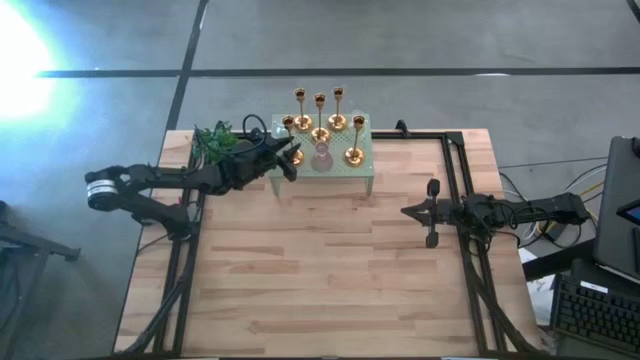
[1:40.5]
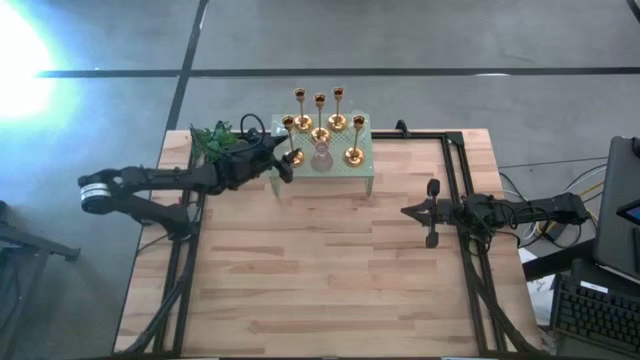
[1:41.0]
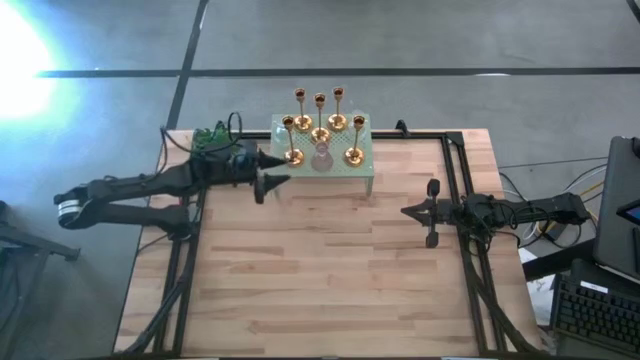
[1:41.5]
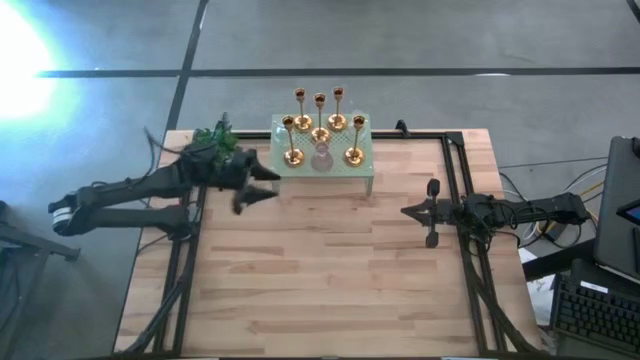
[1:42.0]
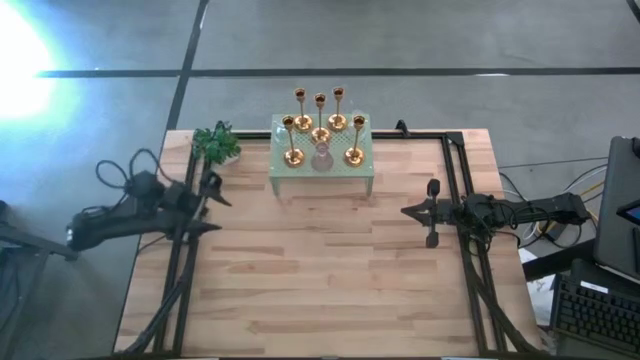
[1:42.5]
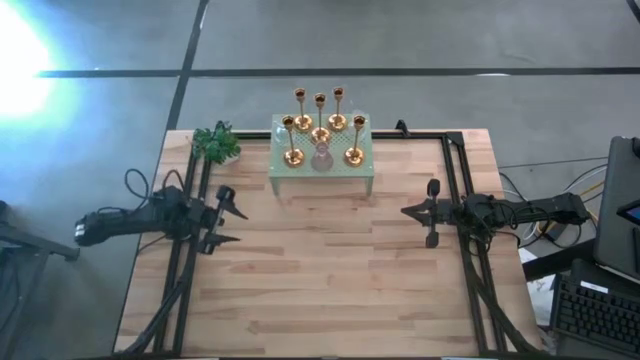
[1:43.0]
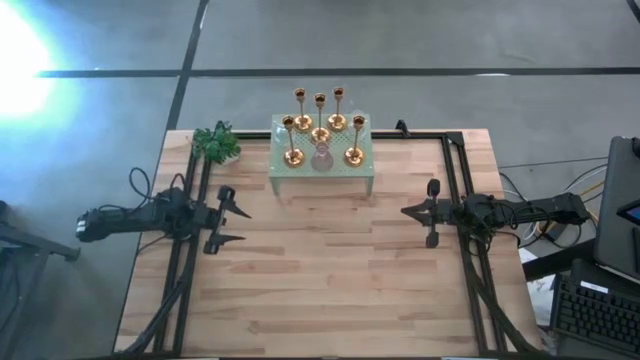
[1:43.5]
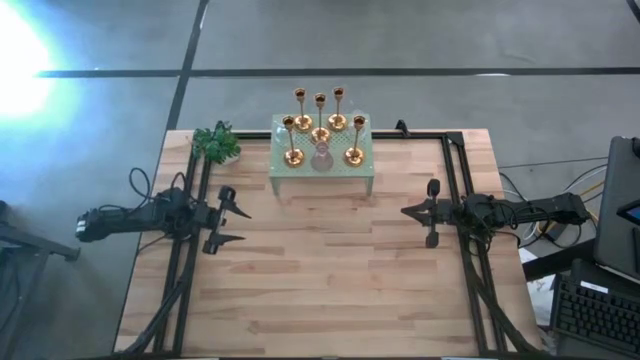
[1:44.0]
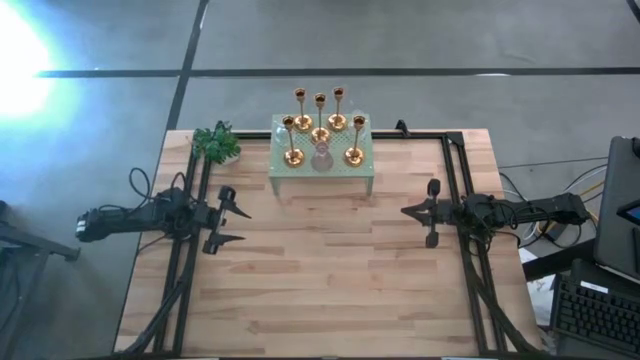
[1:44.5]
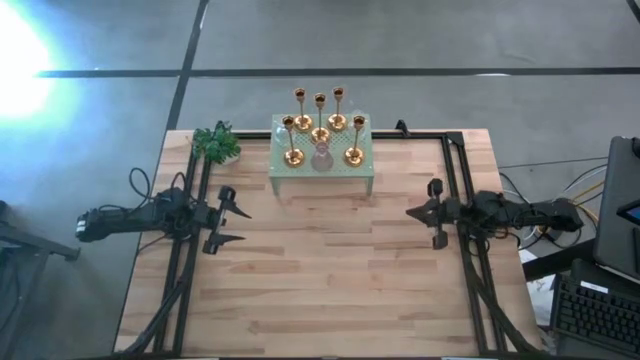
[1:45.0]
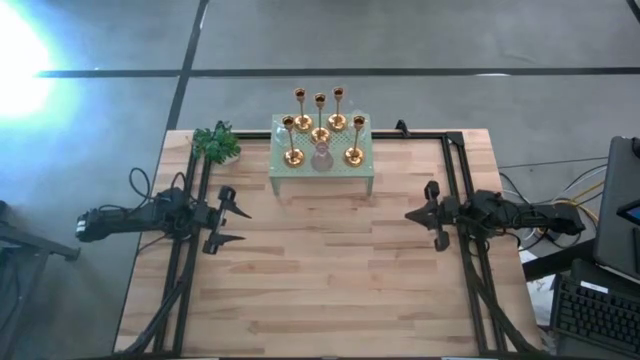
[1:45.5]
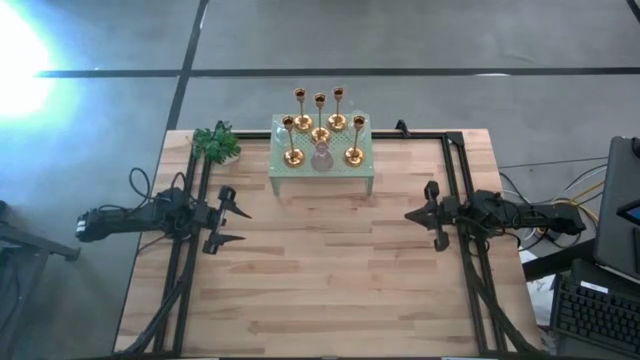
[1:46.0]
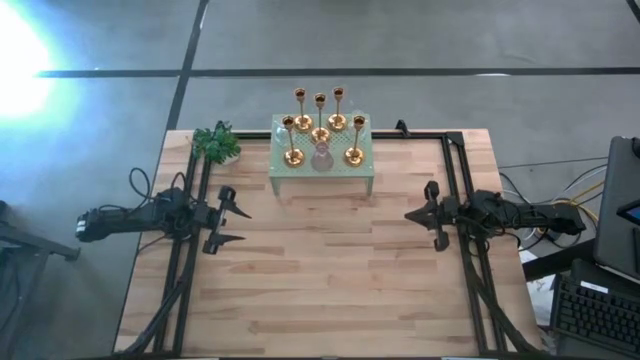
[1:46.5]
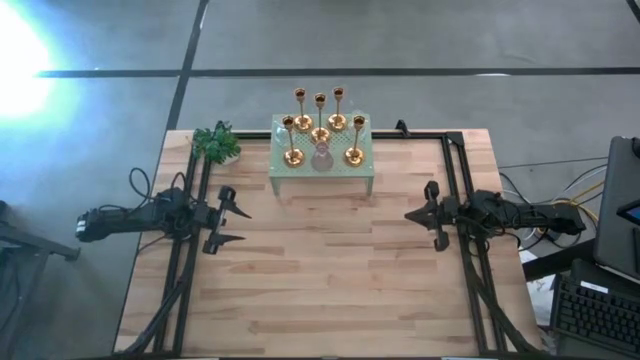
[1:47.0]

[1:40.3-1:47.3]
Task: Pick & Place candle stick holders
Return to Home Position

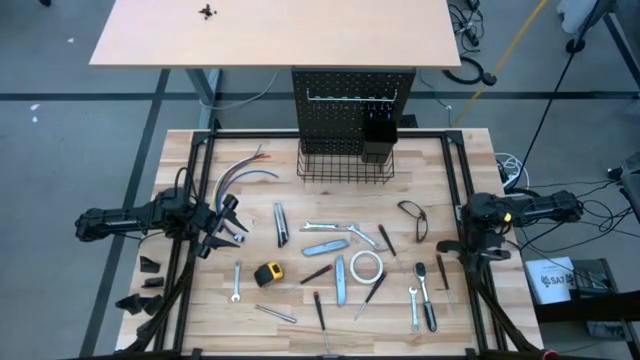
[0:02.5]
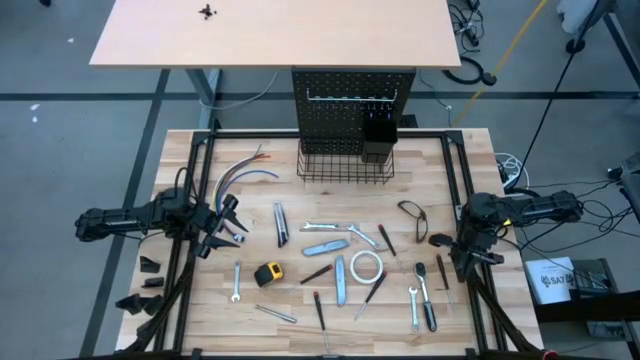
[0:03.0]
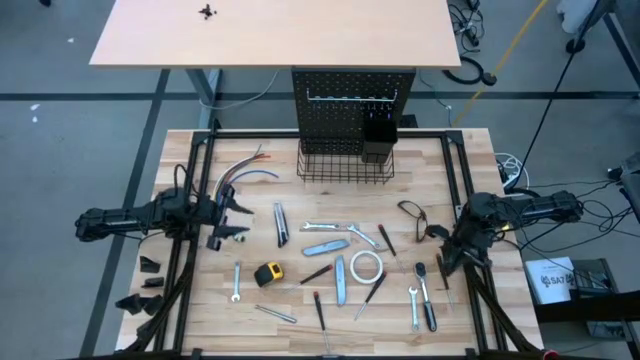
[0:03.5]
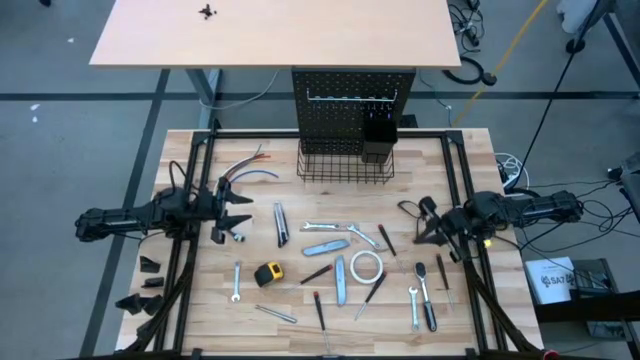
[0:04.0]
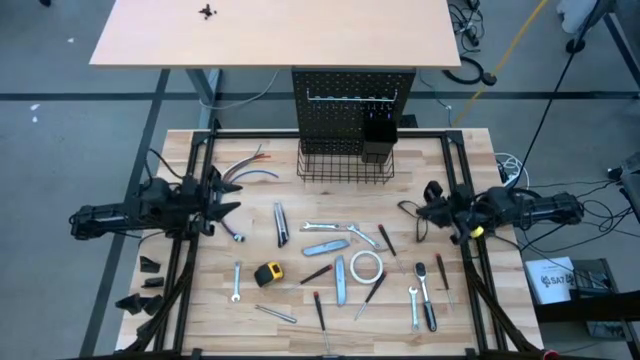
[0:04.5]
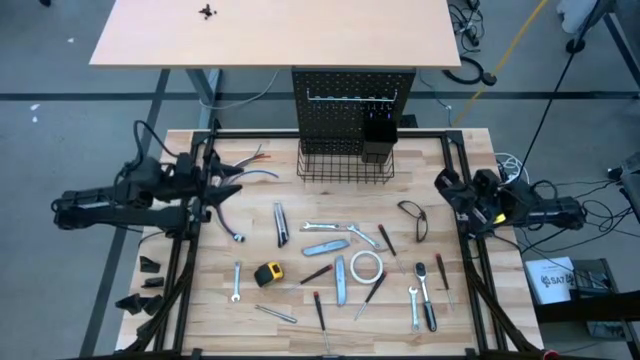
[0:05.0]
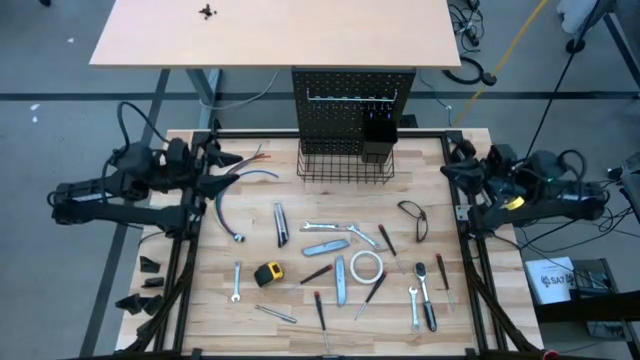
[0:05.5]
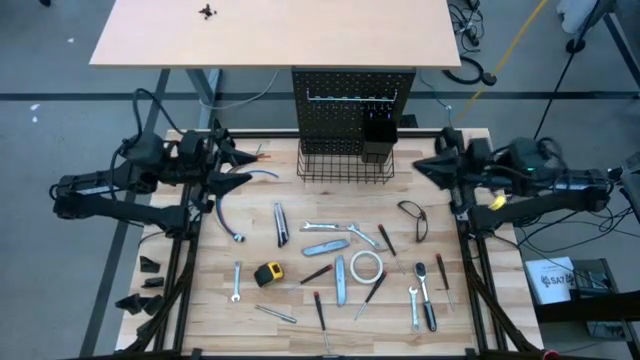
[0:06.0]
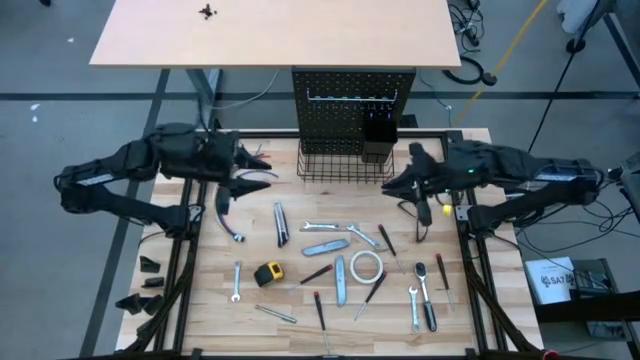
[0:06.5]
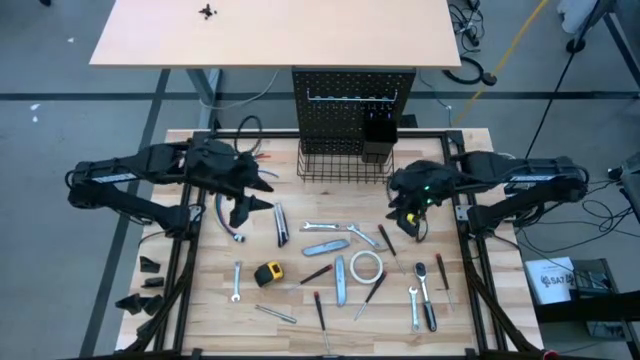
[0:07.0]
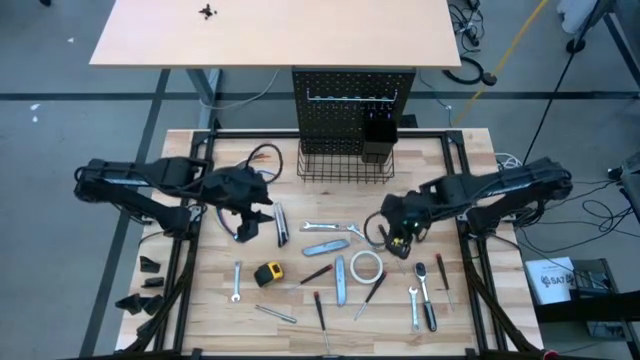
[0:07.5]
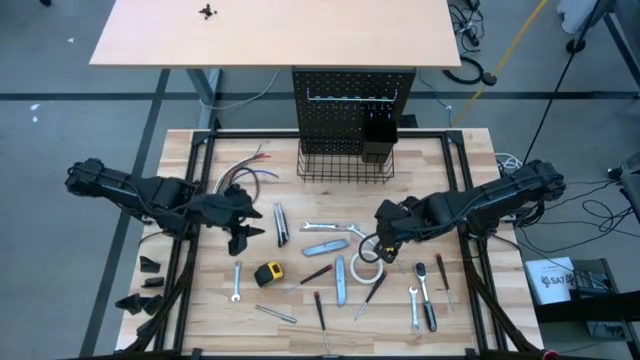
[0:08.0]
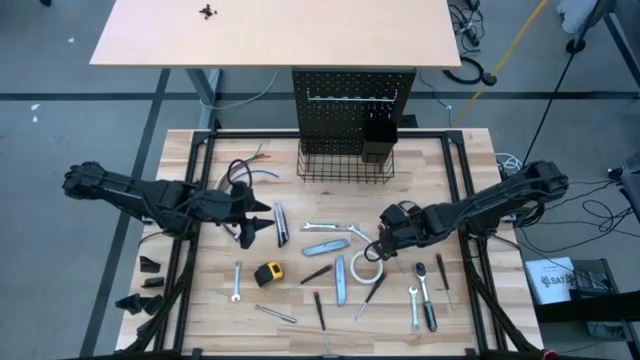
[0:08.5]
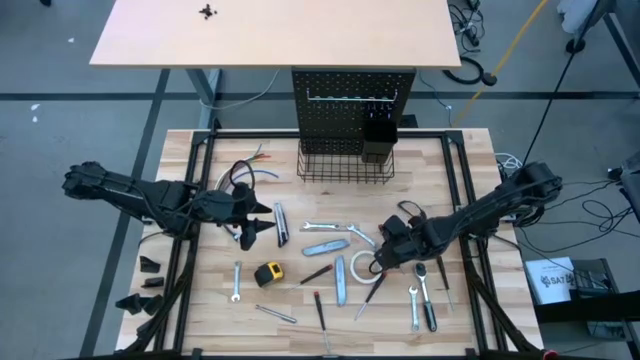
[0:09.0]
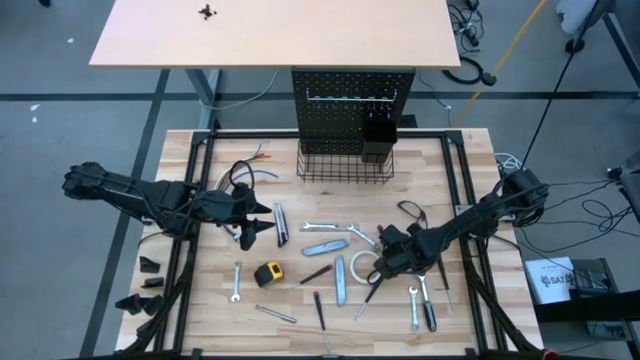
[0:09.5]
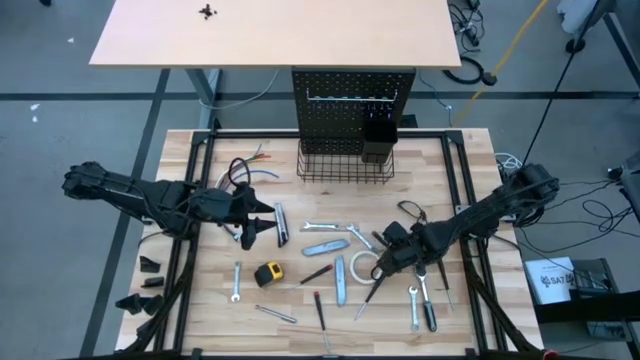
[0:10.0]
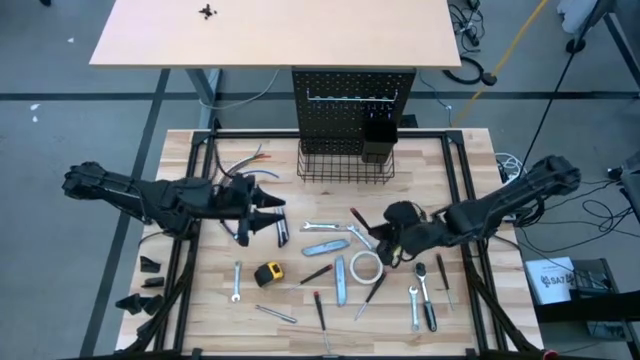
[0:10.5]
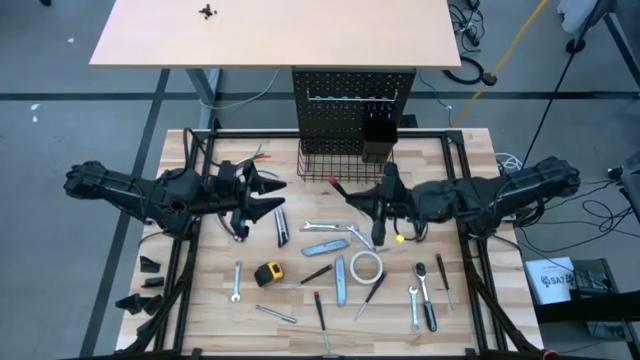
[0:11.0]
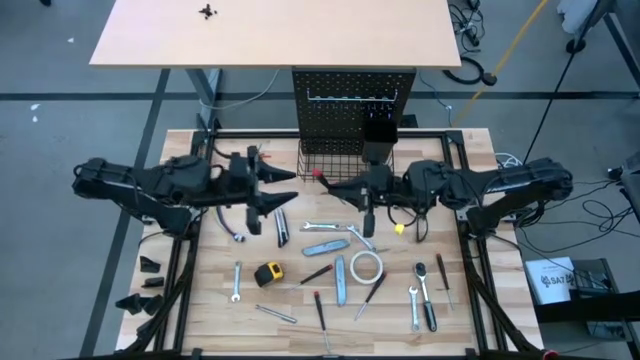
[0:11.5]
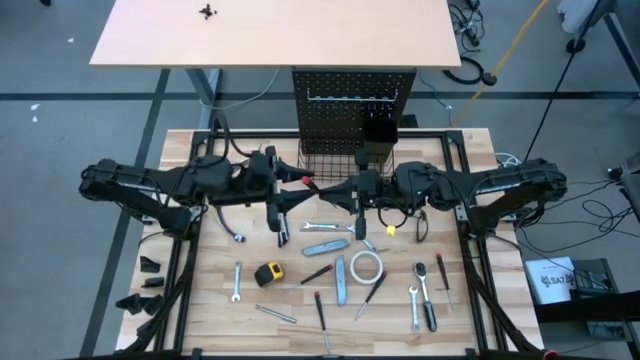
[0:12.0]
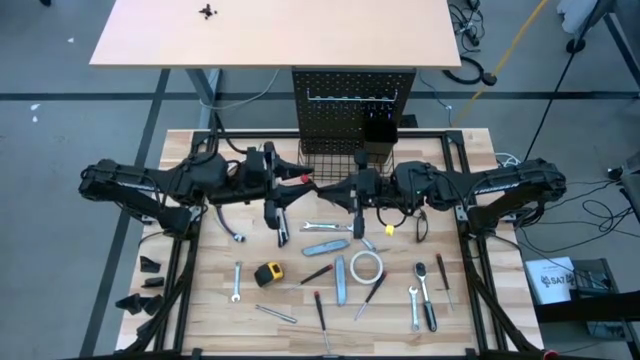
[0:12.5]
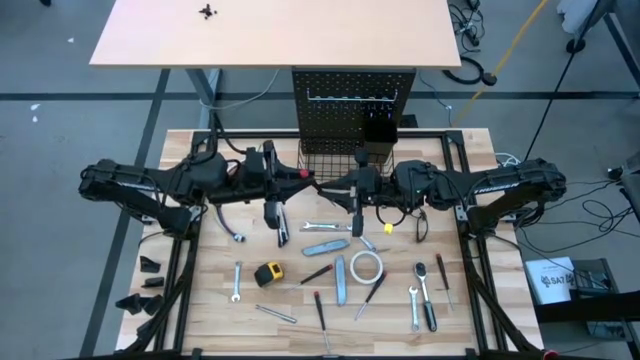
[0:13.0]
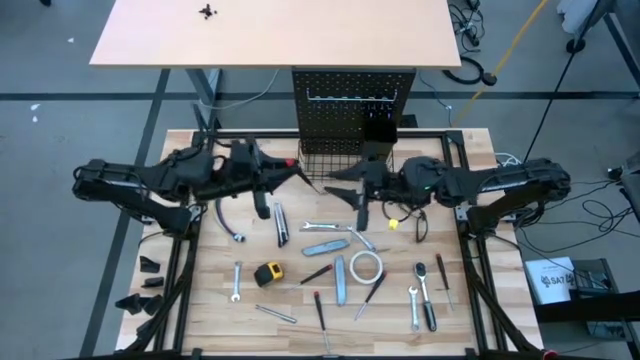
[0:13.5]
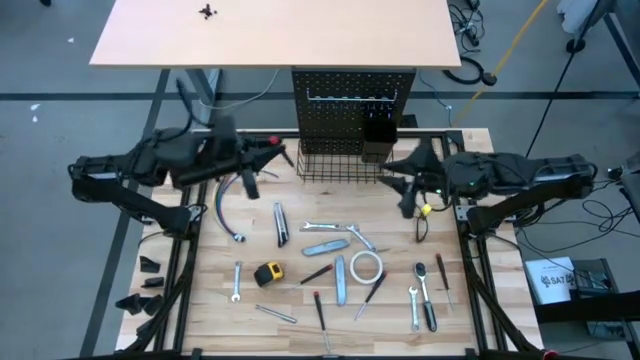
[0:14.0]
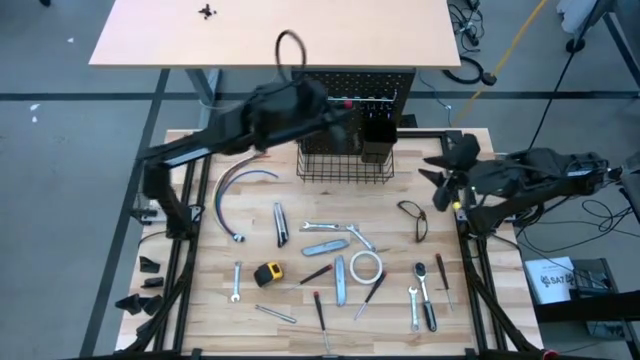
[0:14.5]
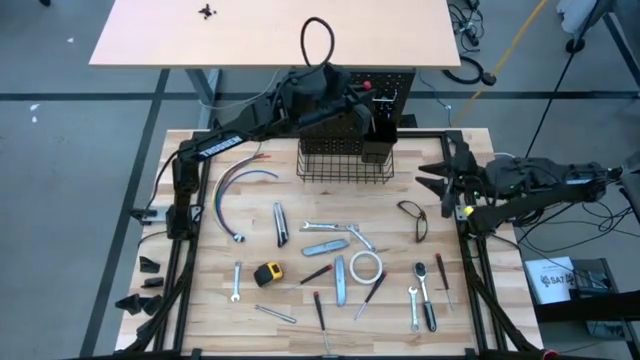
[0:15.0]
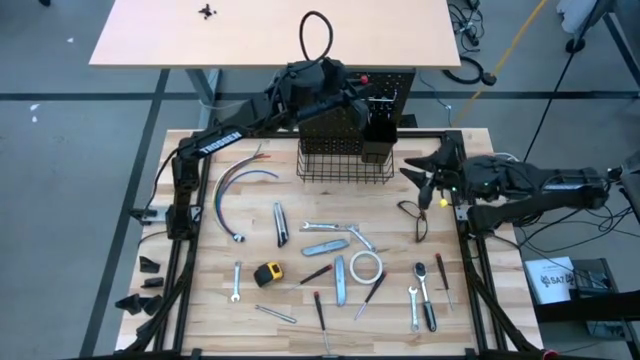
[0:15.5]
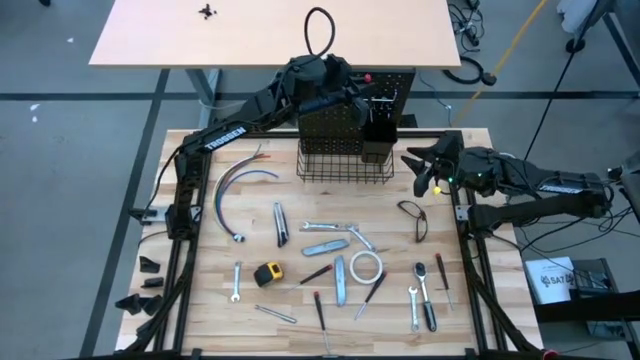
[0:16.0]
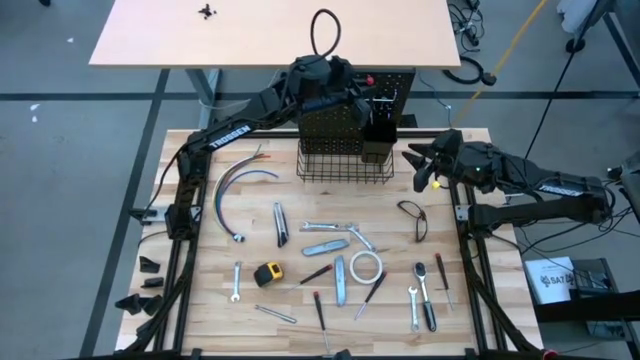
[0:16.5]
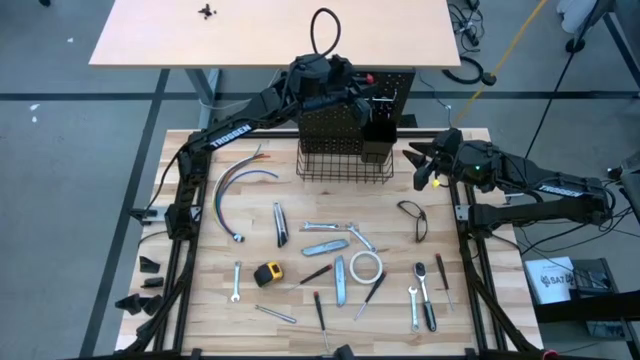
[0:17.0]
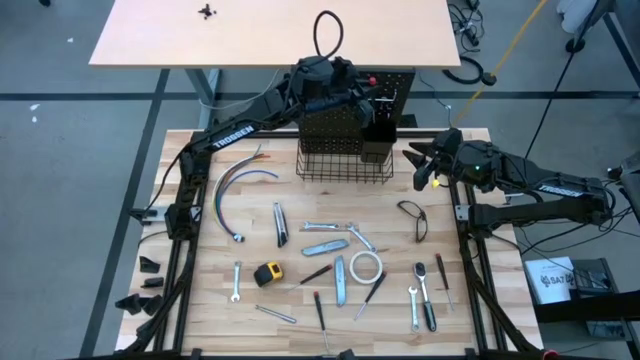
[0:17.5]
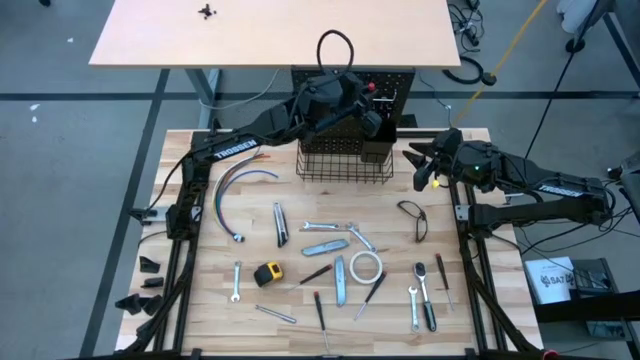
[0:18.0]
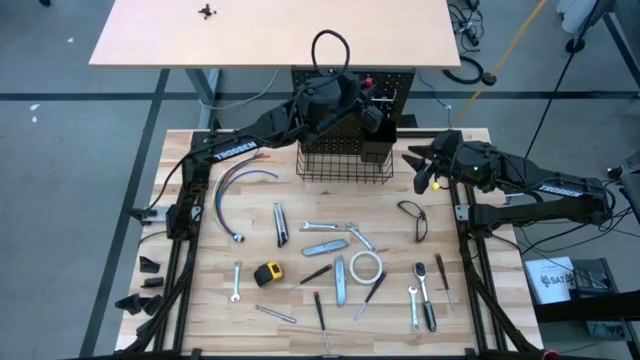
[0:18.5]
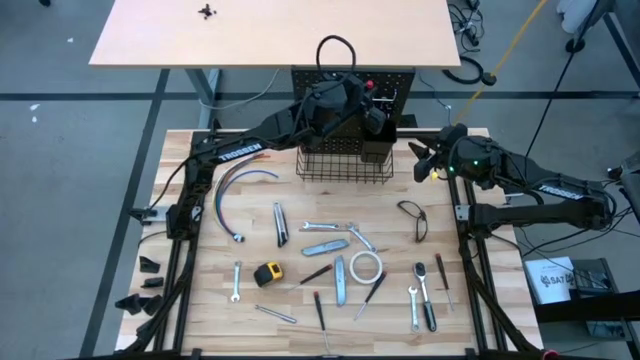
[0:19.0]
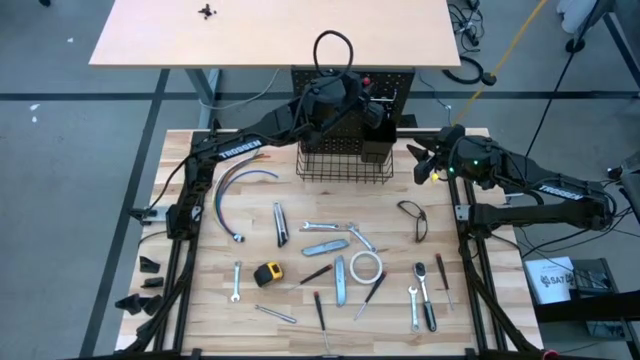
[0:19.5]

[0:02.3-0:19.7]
Task: Hang tools onto peg board
Hang the nut driver onto the pegboard
